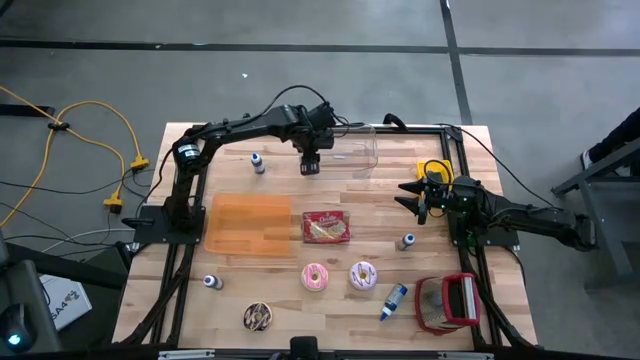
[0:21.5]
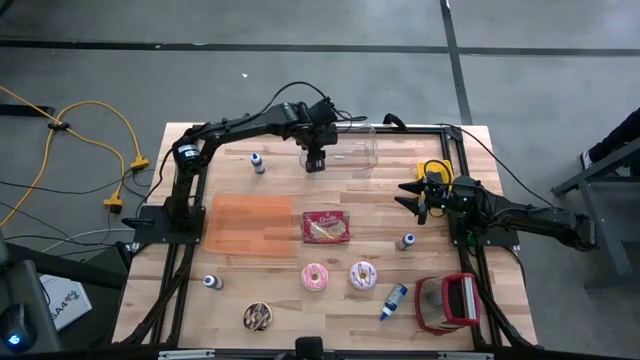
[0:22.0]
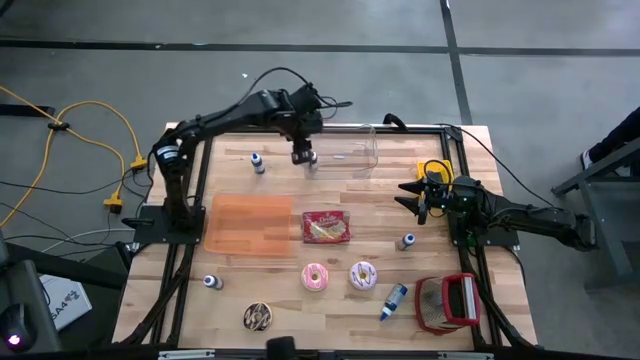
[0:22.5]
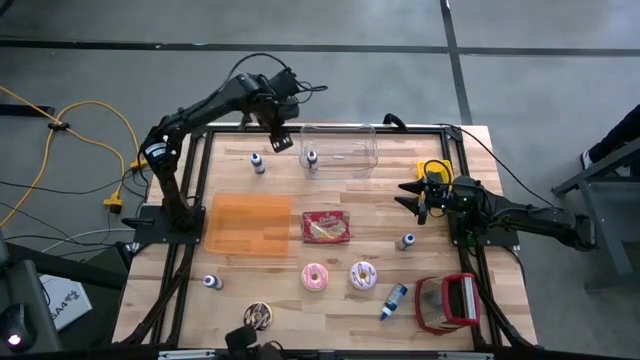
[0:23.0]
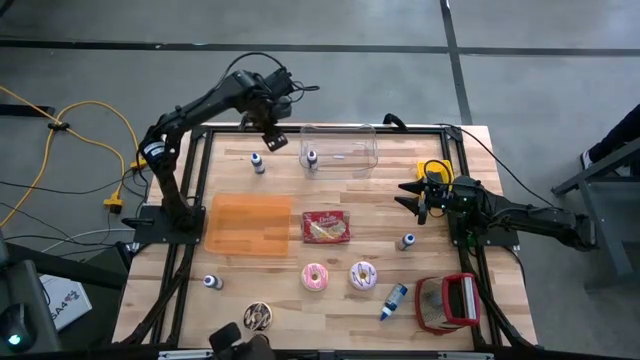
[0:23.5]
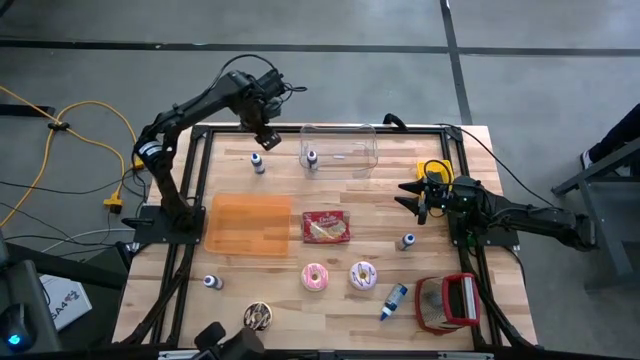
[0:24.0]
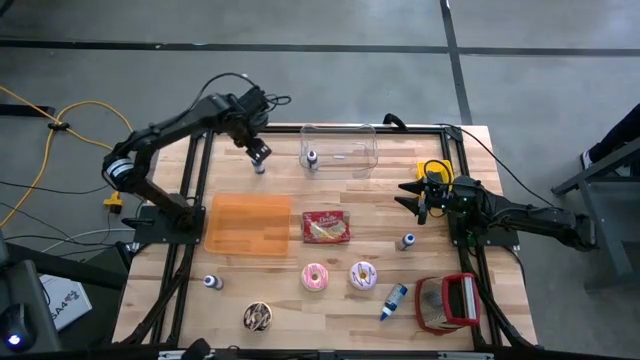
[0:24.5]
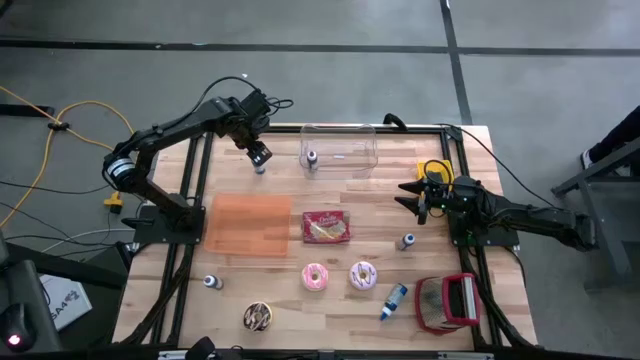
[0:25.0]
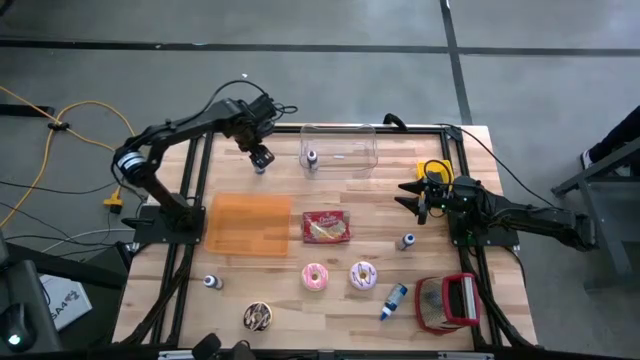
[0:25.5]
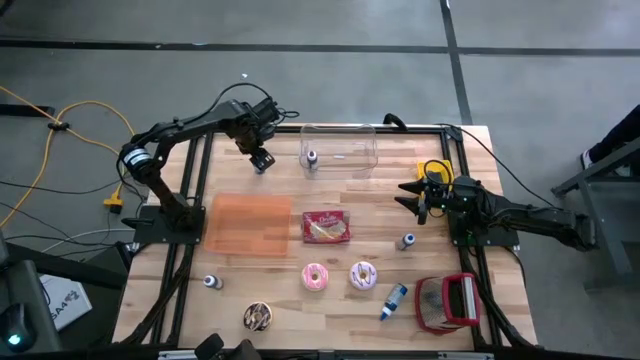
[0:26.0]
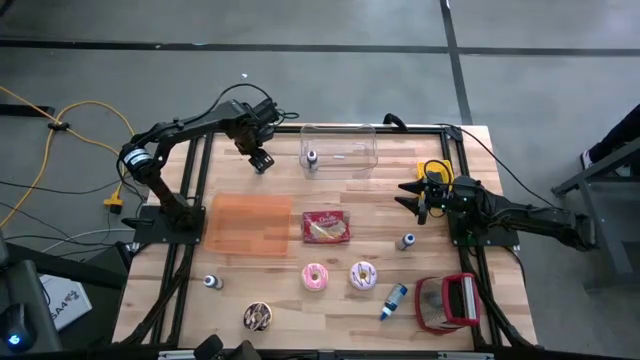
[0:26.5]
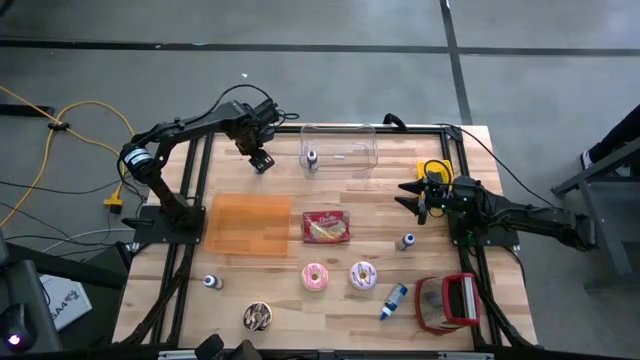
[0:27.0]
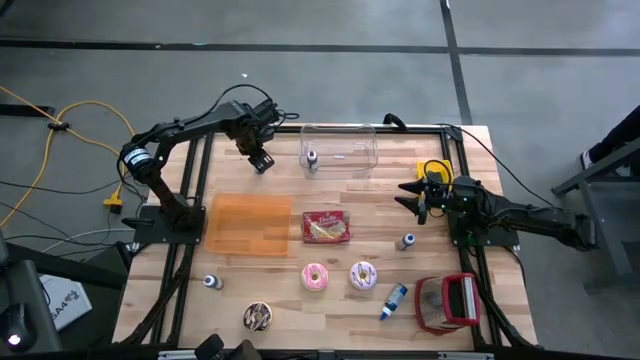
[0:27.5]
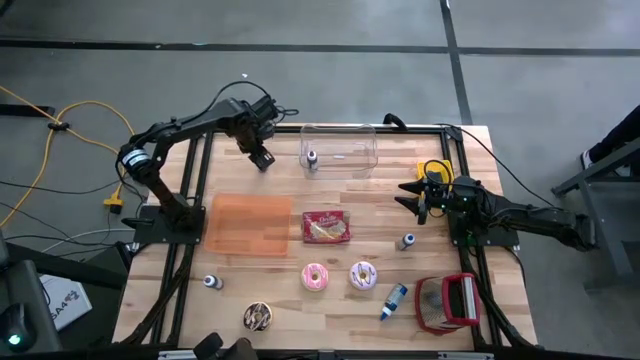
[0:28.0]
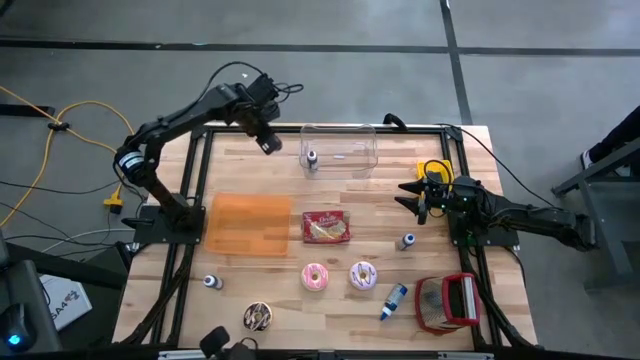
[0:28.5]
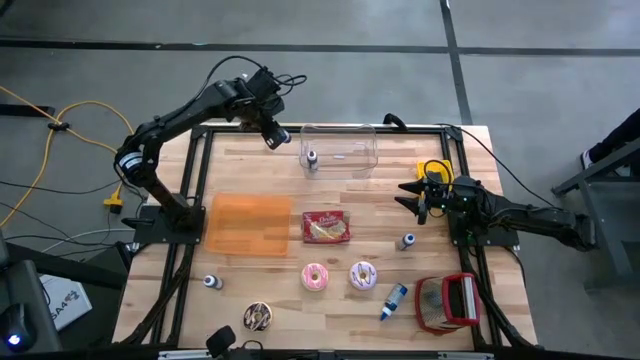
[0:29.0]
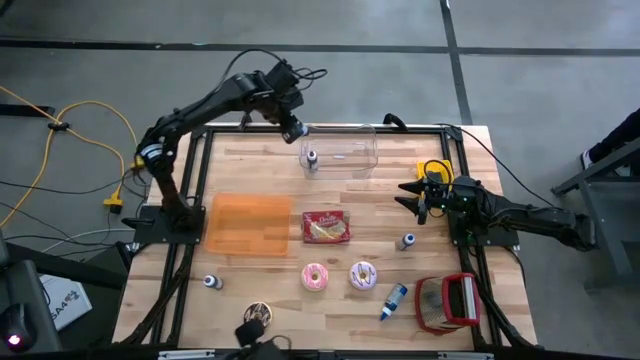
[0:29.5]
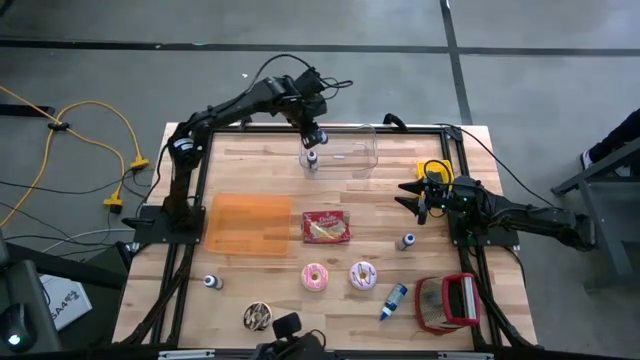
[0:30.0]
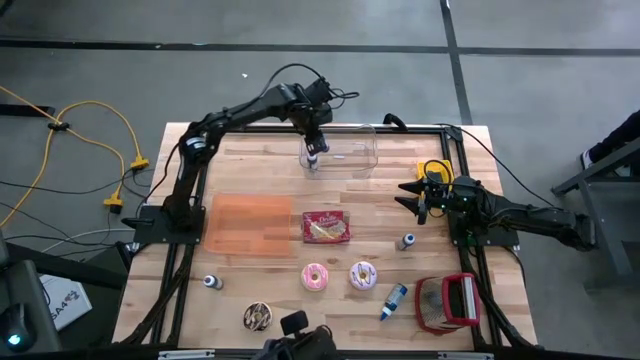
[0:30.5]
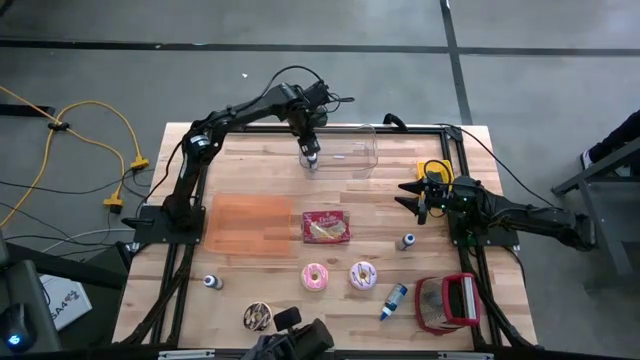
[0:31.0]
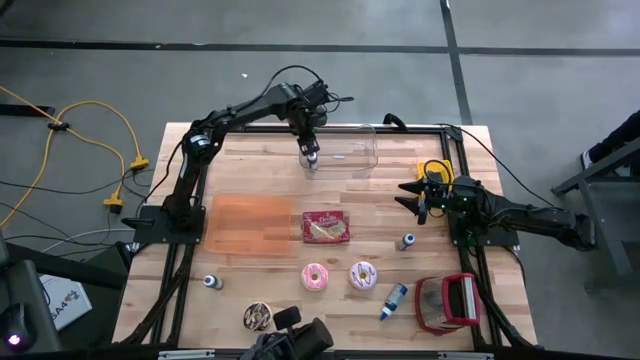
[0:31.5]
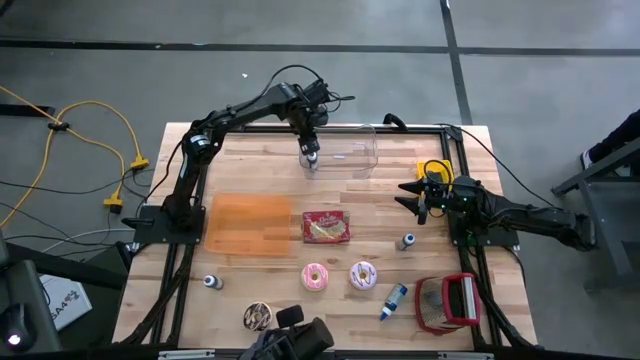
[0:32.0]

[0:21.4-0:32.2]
Put the top left blue food coloring bottle into the transparent bin

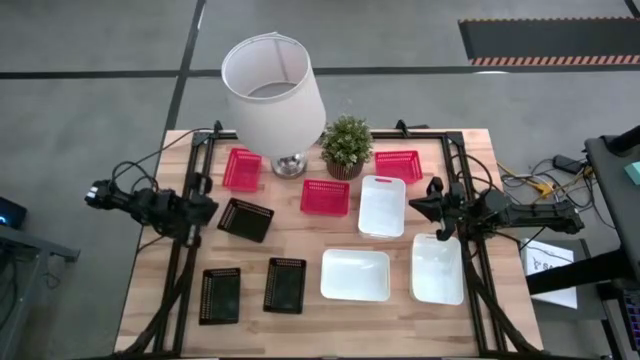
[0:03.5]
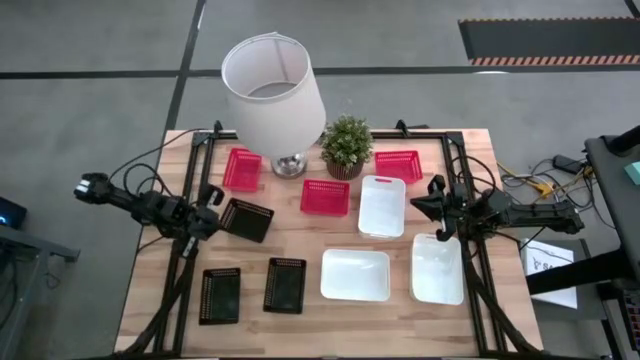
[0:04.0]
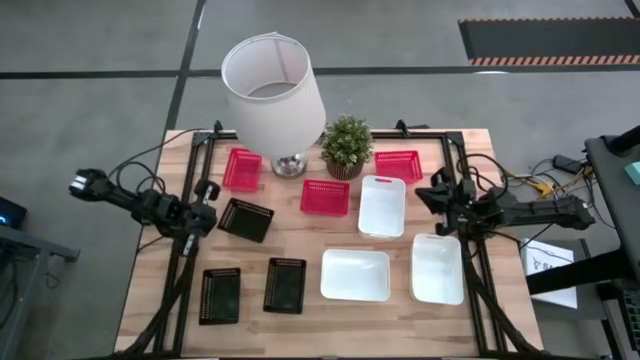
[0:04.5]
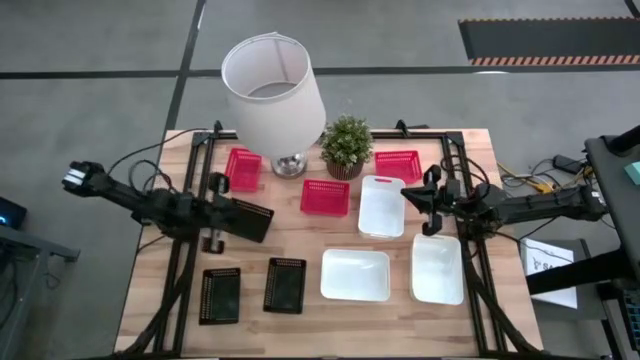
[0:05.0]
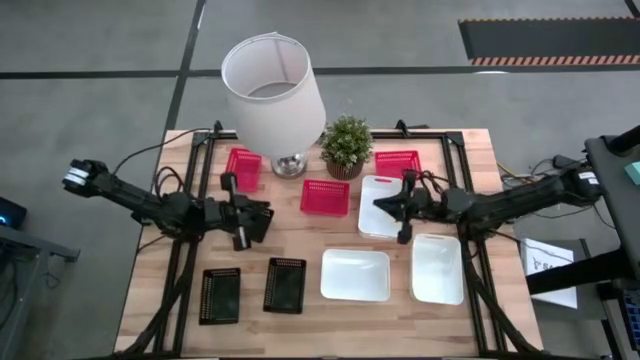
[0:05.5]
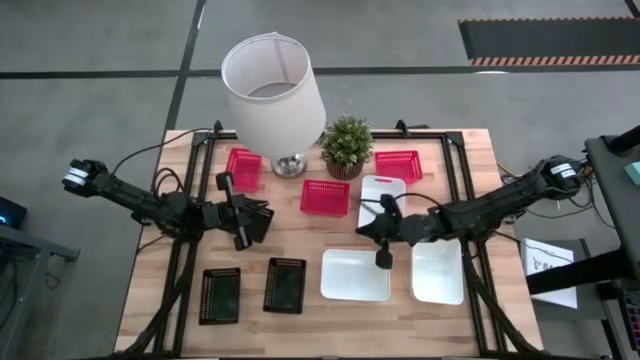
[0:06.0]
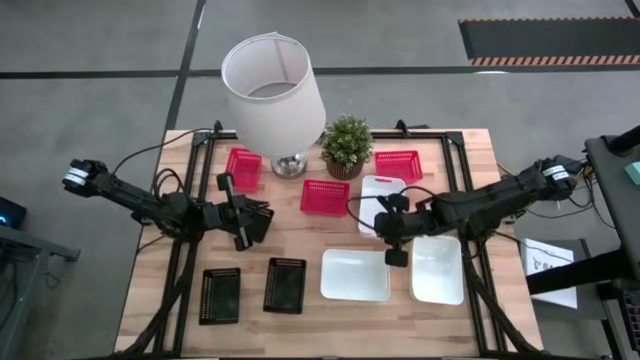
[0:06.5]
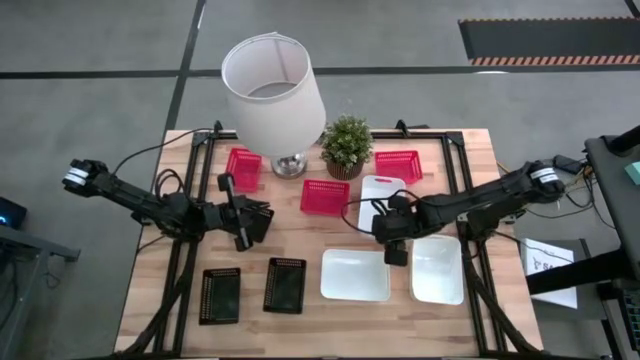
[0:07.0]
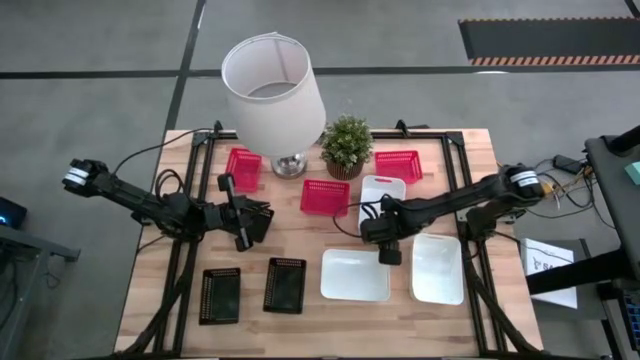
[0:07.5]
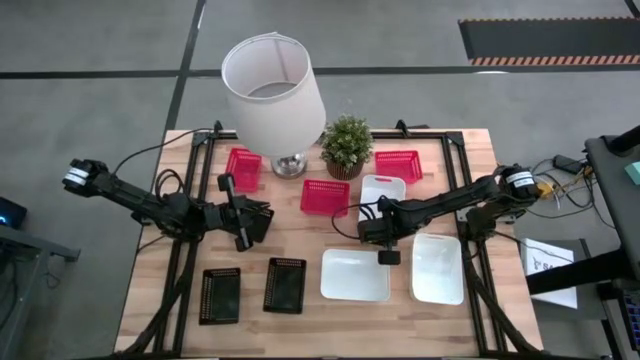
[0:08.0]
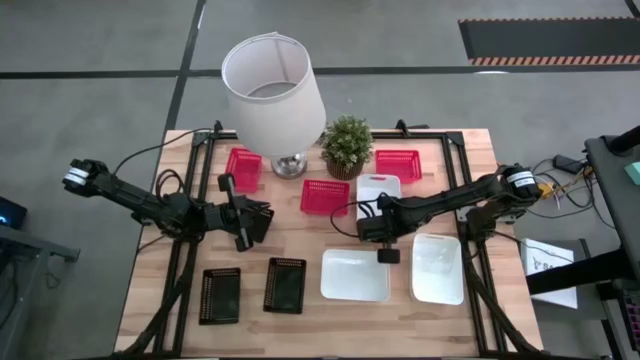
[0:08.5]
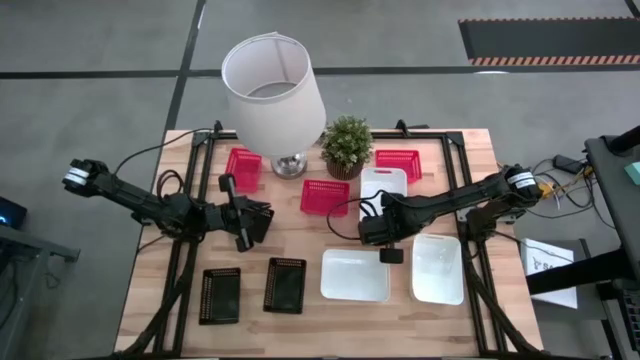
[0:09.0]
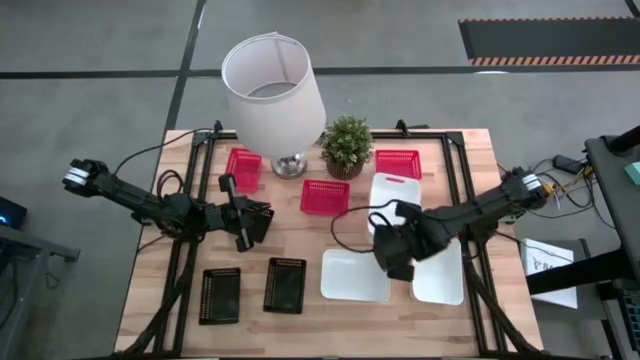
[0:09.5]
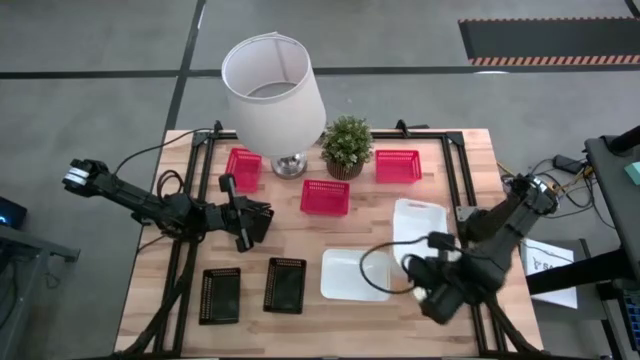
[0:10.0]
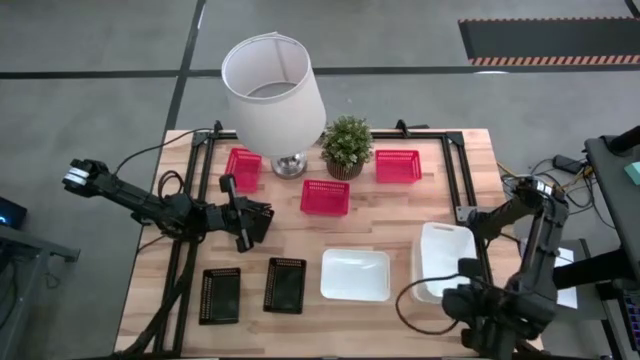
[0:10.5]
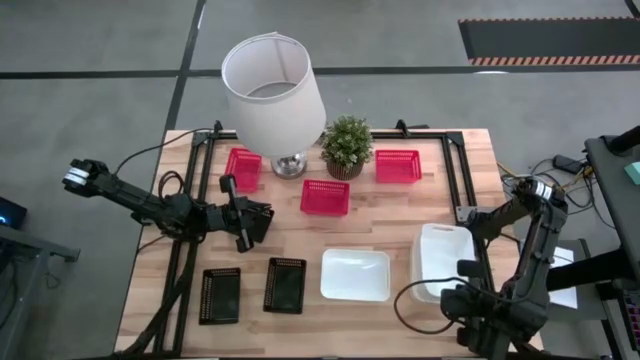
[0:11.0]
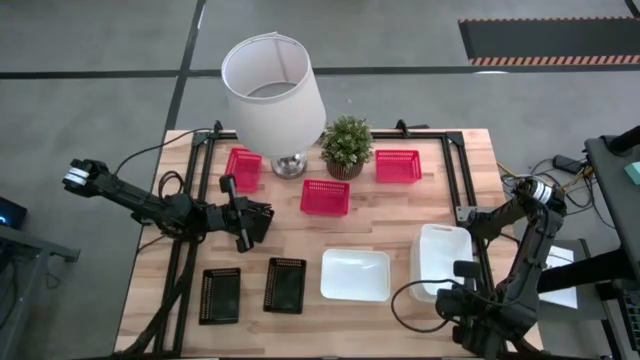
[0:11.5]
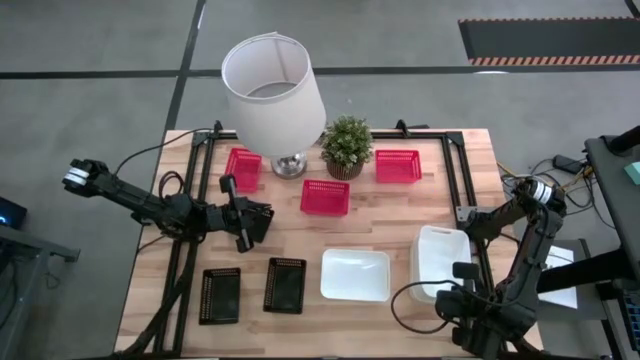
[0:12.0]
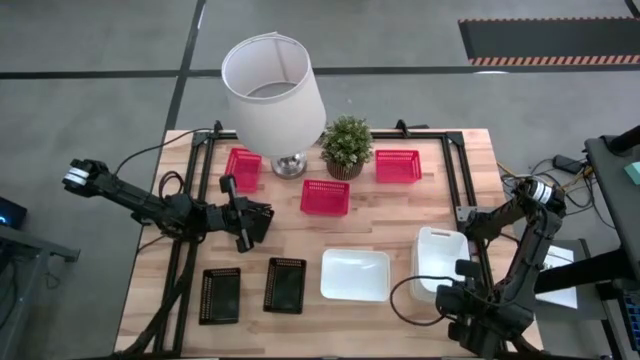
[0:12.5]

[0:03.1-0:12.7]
Stack the top white bin on the bottom right white bin
